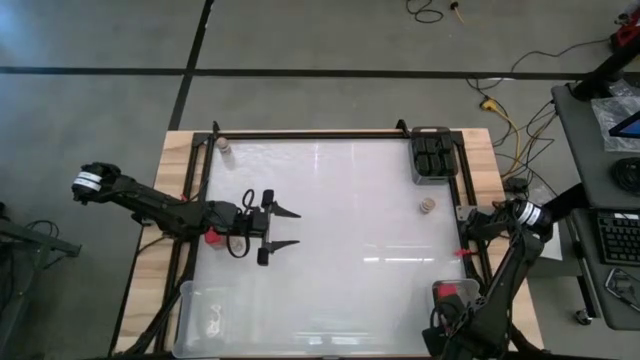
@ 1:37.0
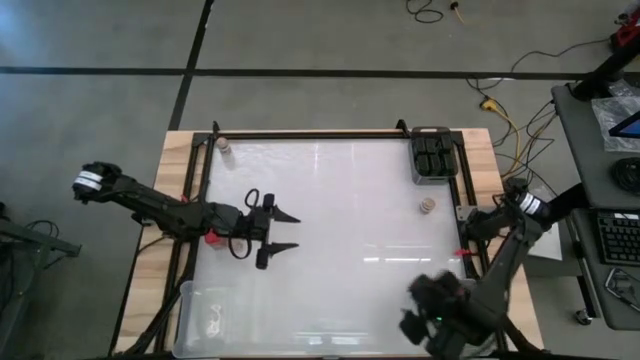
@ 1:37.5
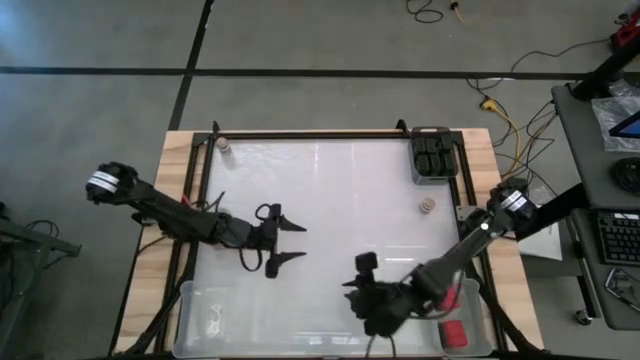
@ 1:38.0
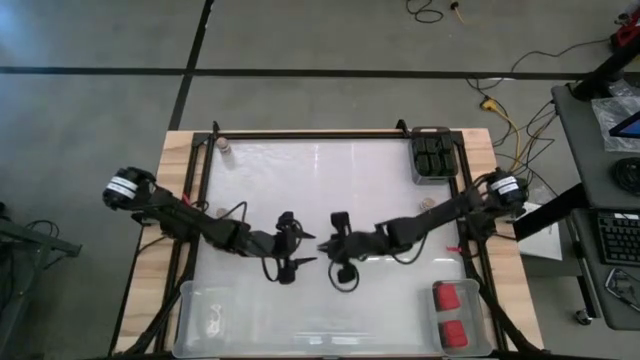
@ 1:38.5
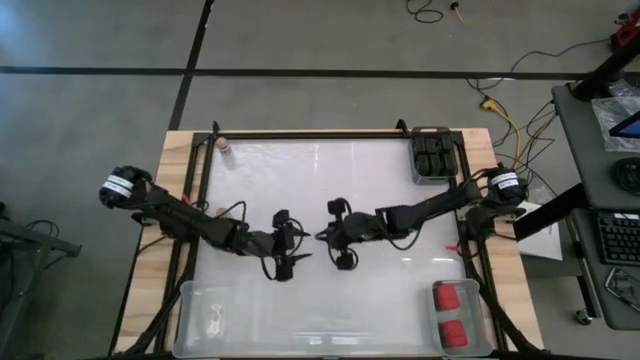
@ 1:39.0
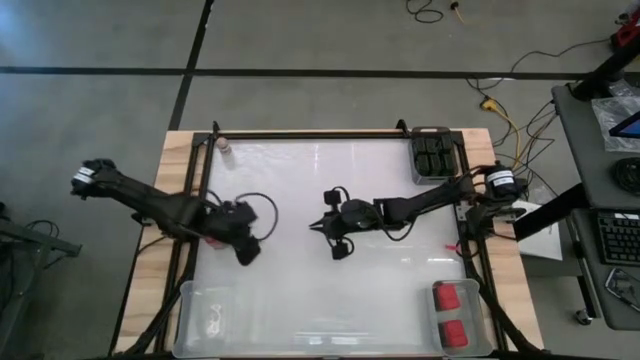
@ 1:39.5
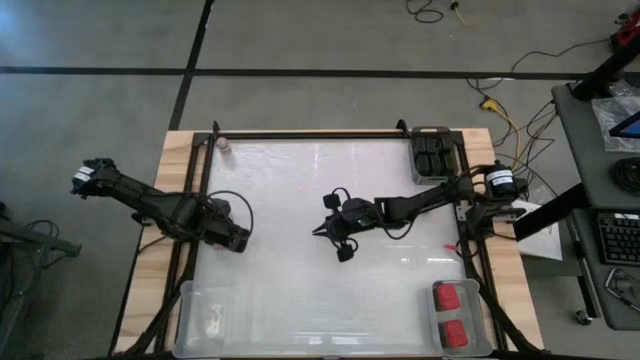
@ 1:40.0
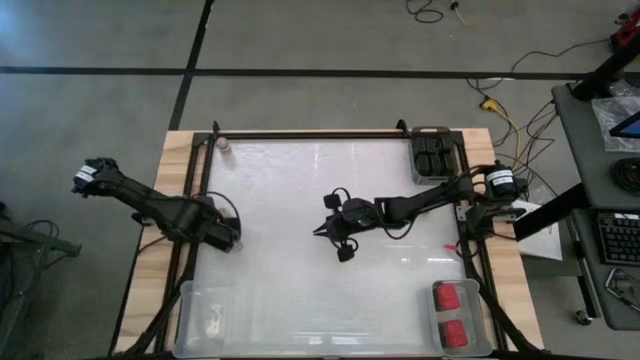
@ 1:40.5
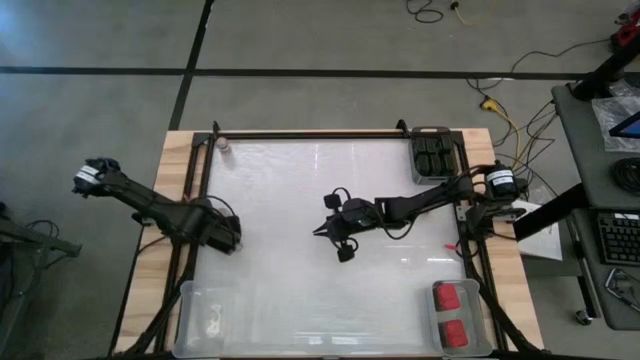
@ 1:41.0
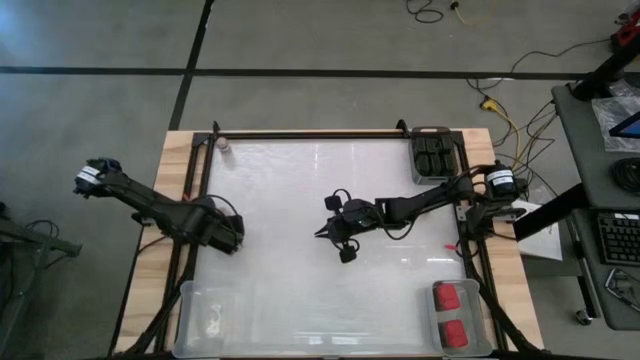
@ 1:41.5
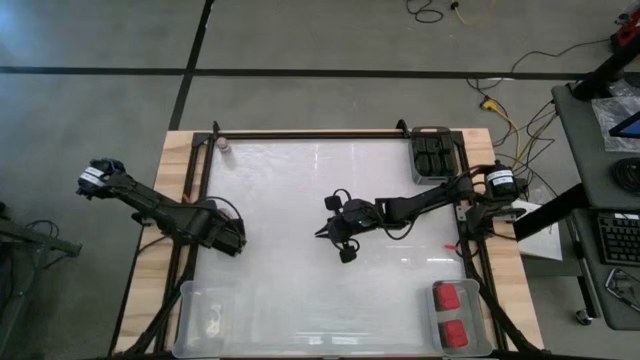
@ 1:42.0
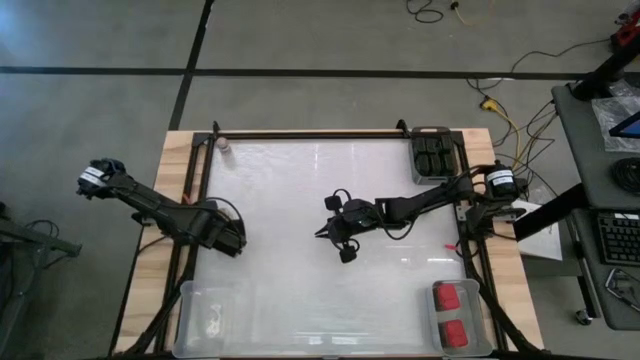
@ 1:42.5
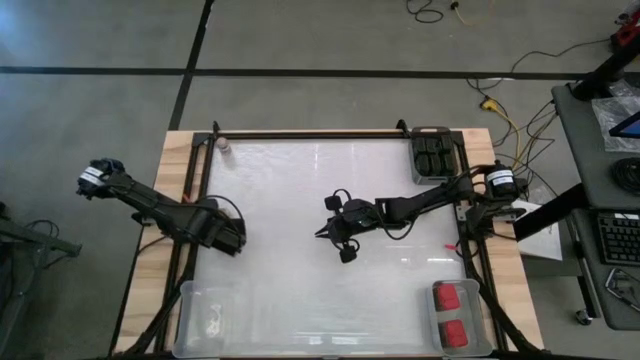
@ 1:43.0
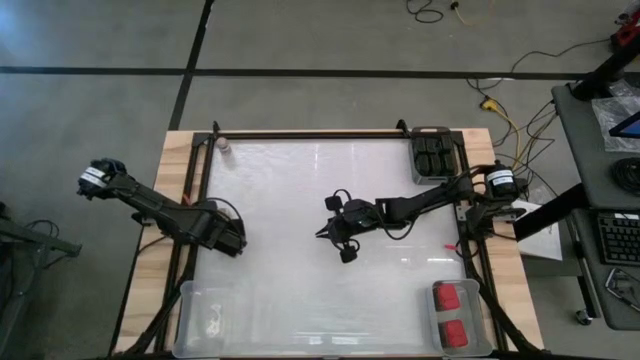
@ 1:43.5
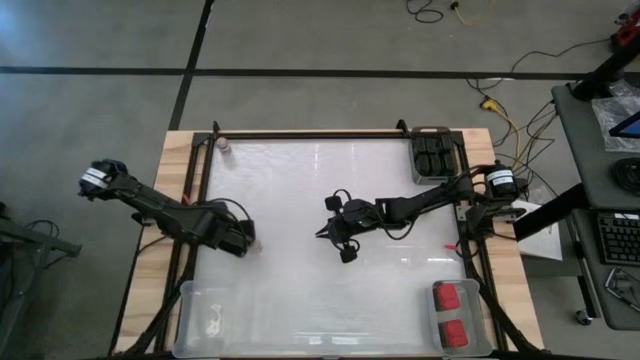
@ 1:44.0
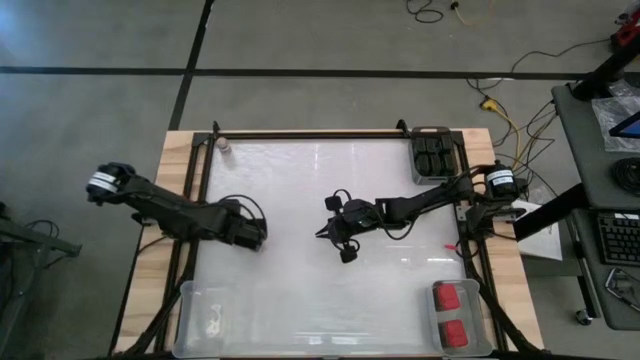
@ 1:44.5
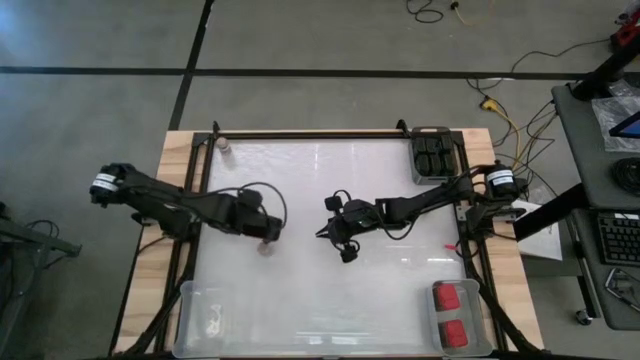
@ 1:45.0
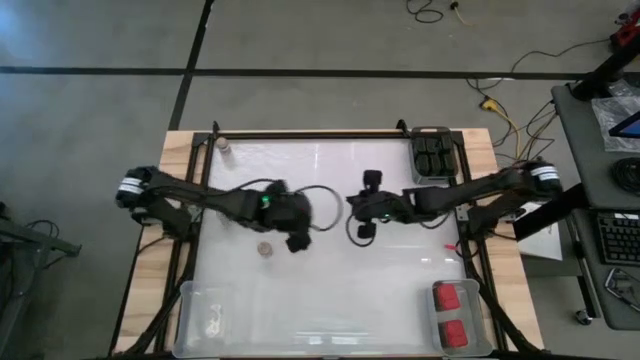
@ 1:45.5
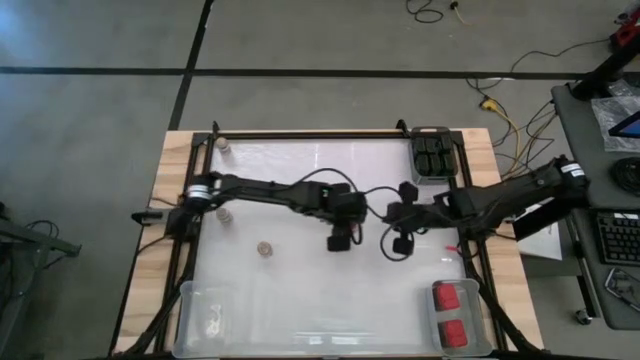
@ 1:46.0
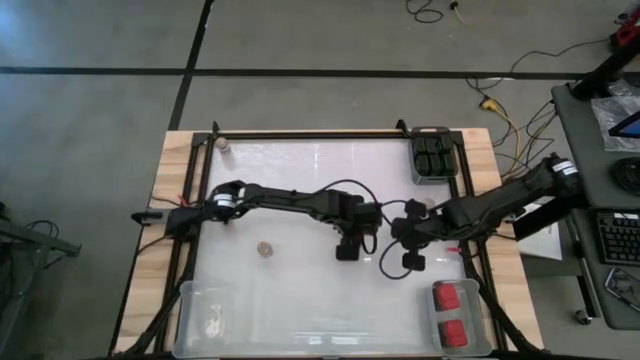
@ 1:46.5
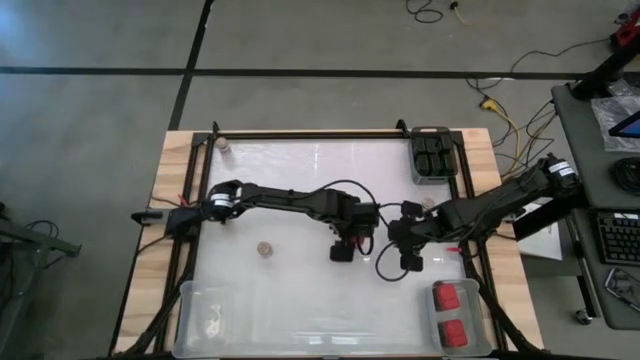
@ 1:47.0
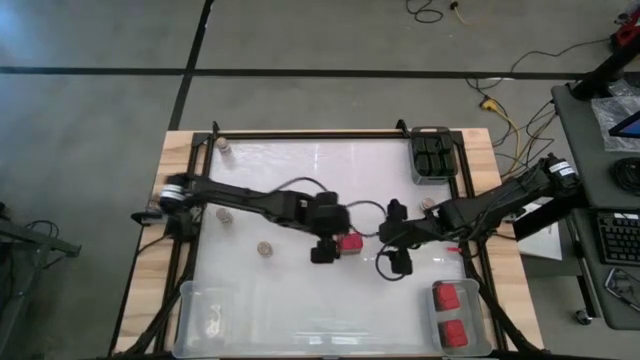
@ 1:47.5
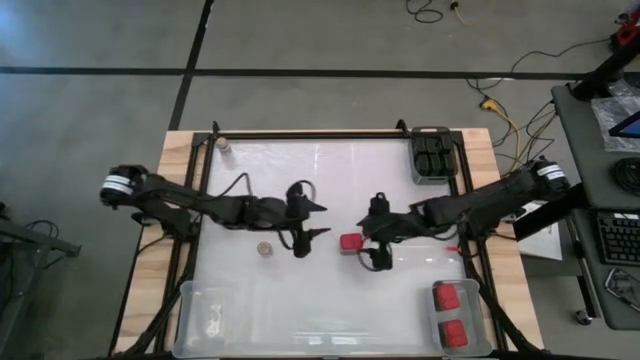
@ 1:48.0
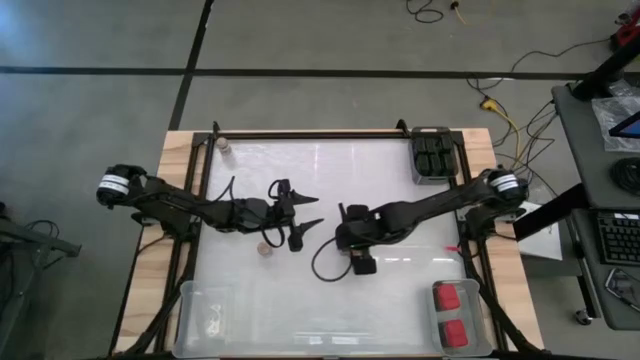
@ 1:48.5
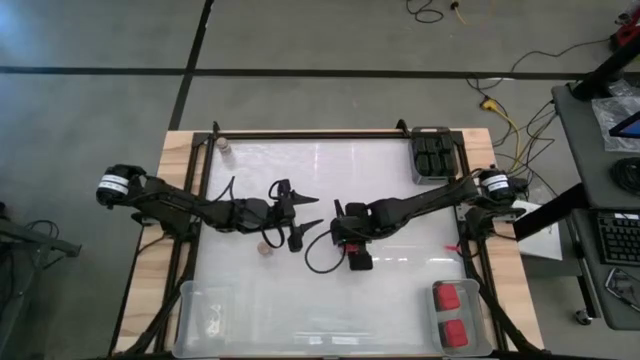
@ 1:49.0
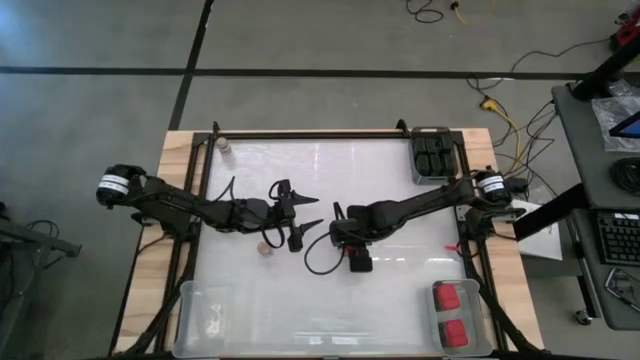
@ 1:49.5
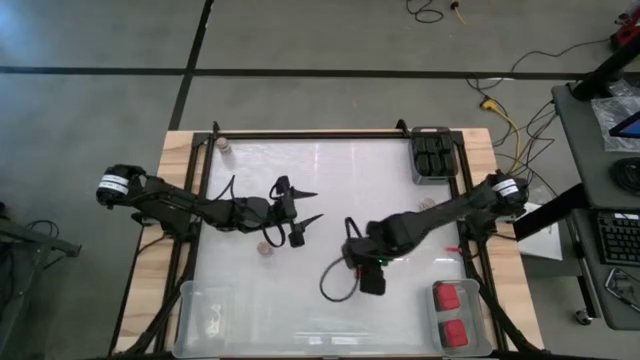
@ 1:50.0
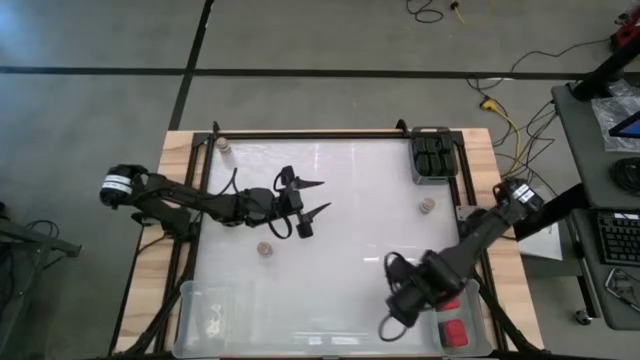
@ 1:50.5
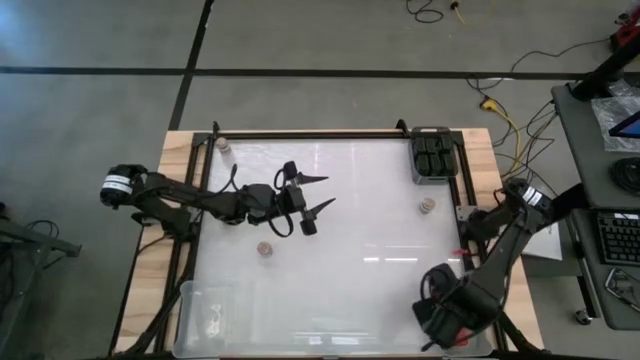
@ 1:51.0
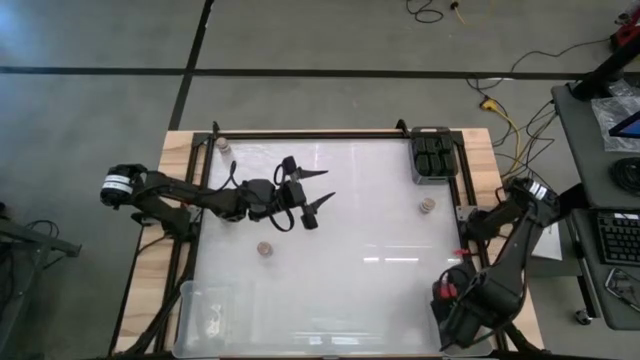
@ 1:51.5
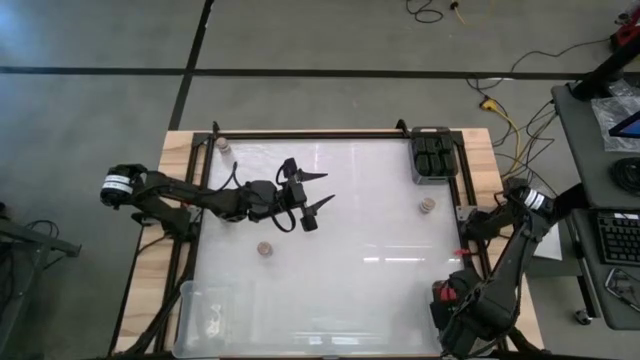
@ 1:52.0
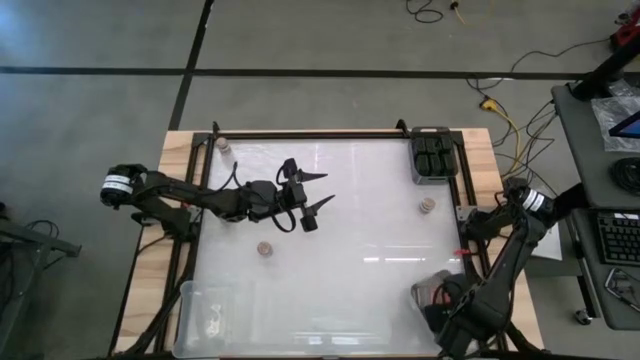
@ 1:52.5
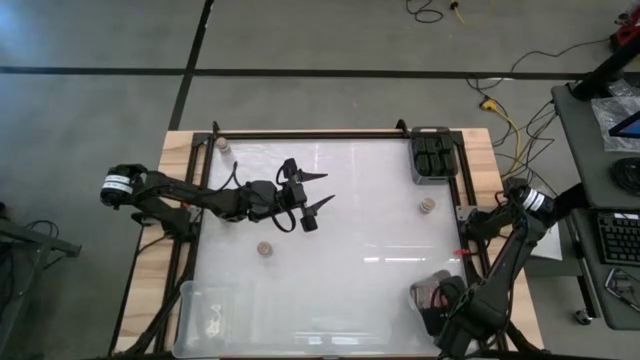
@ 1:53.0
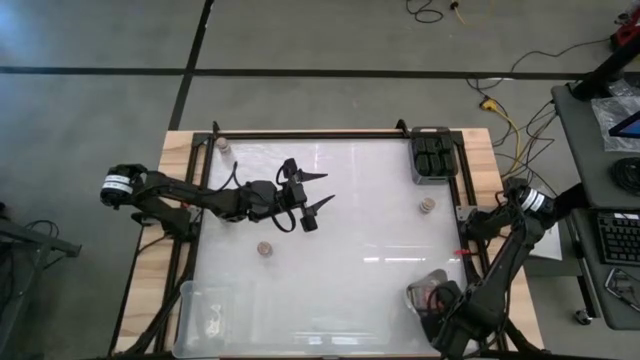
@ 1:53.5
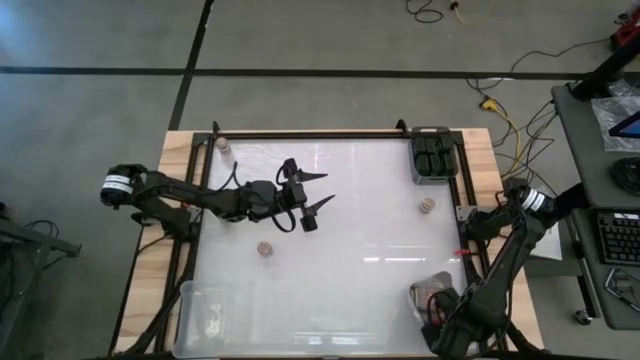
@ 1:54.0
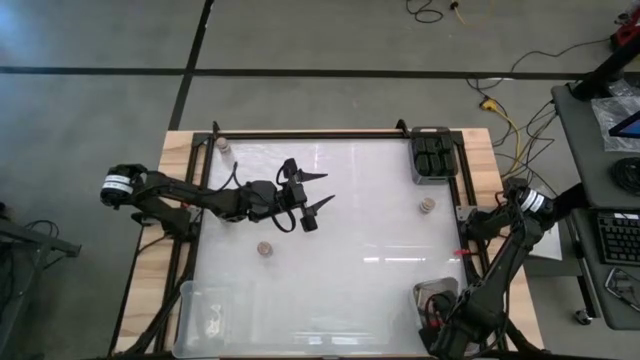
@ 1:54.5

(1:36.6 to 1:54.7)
Task: Sort spices by type
Put the red seasoning can into the gray bin

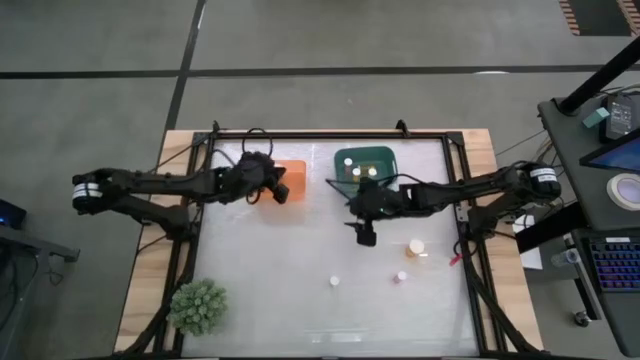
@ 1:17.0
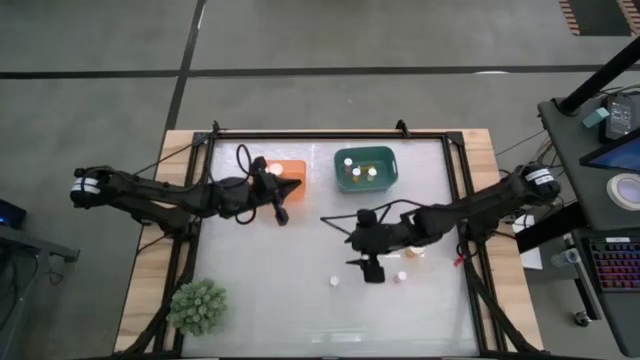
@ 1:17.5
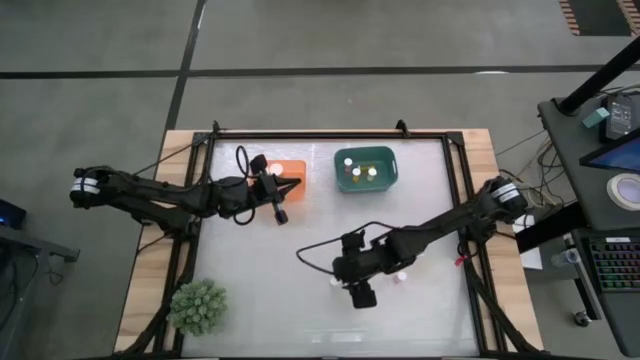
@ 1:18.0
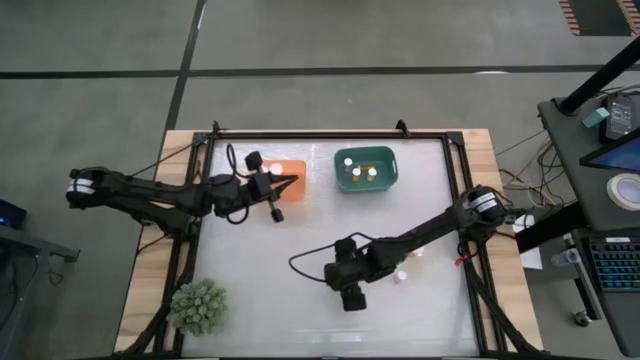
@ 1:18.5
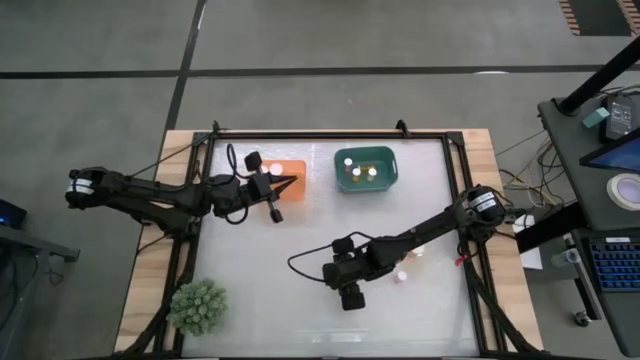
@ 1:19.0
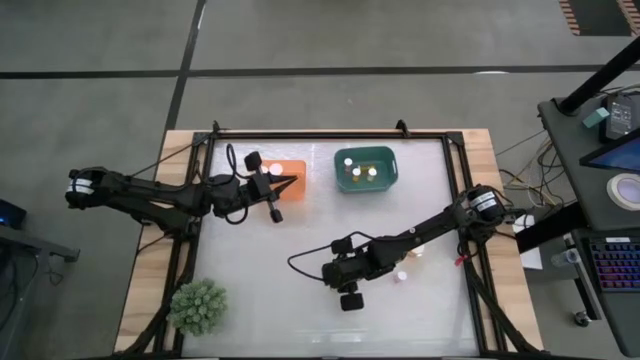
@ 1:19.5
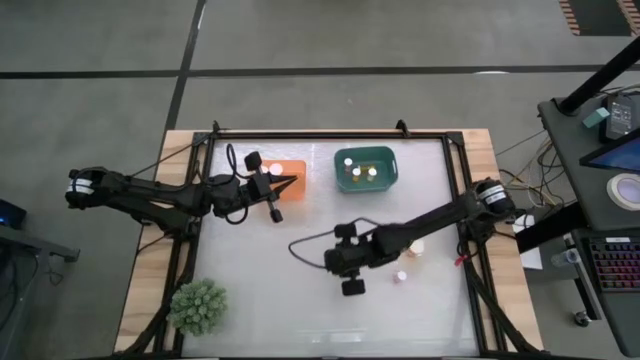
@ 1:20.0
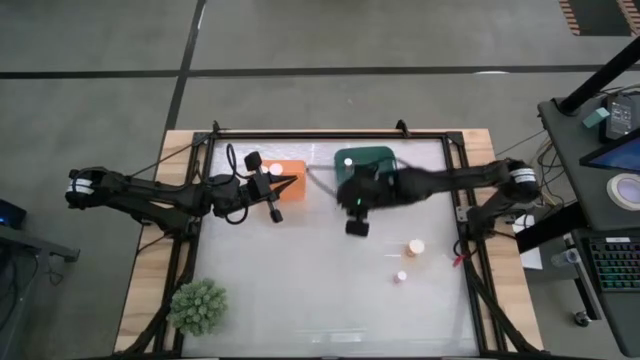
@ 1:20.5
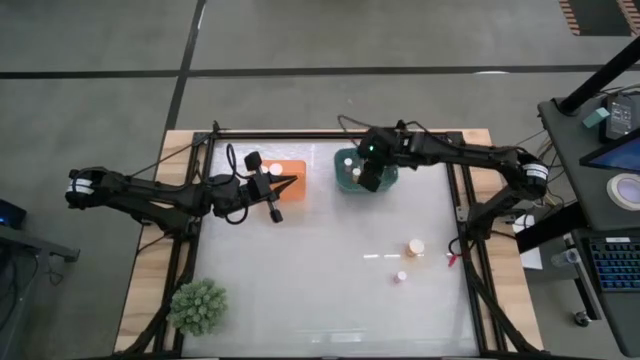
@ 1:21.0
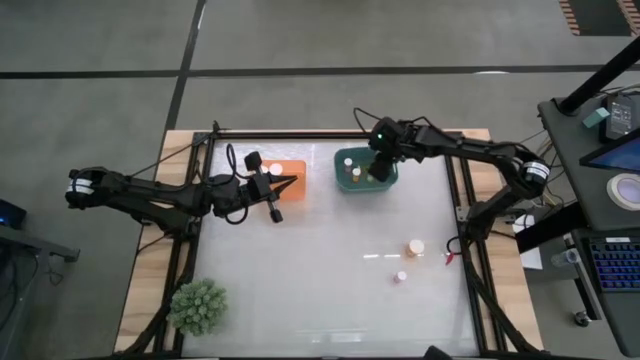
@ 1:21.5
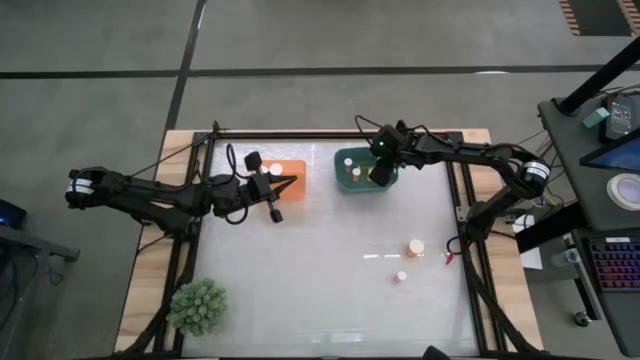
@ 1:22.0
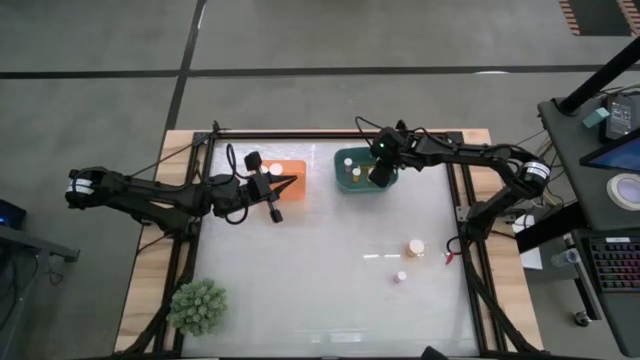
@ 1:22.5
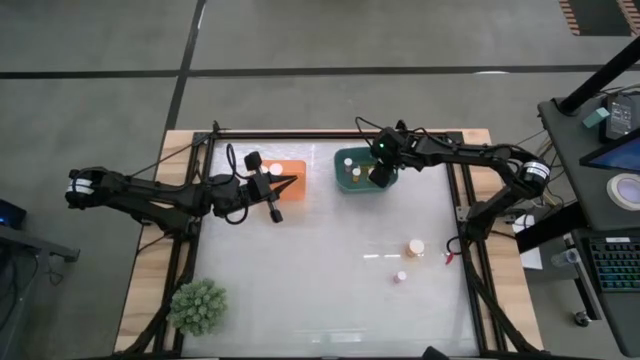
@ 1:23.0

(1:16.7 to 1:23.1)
Task: Pick and place medicine bottles into bin by pill shape (circle, oval)
Put the yellow pill bottle into the green bin
